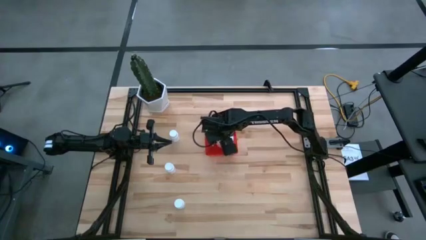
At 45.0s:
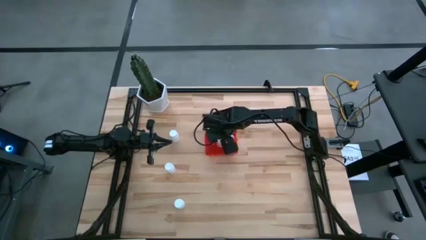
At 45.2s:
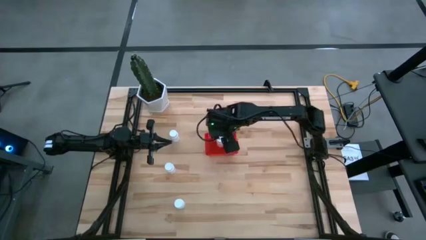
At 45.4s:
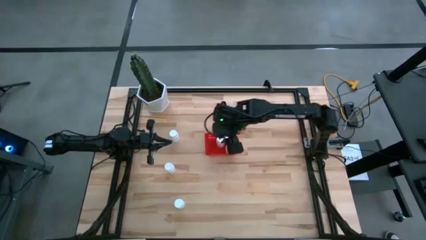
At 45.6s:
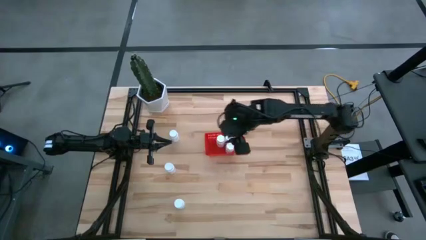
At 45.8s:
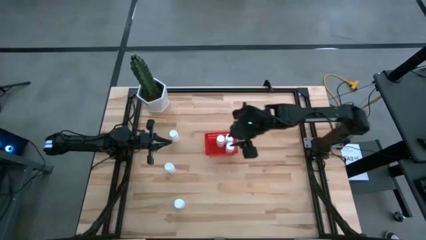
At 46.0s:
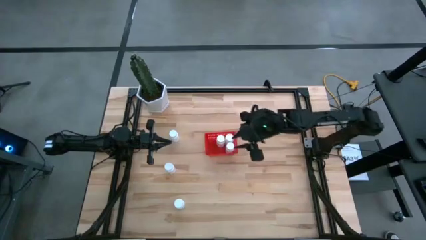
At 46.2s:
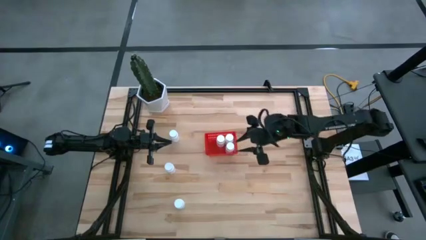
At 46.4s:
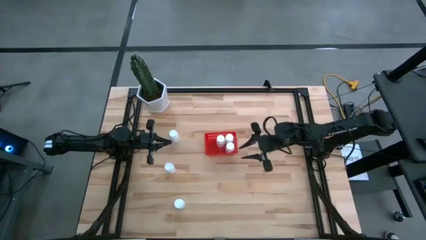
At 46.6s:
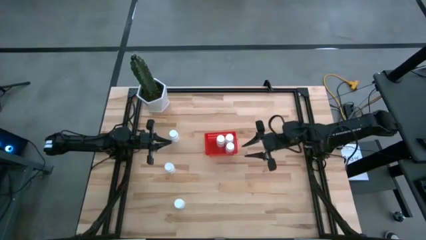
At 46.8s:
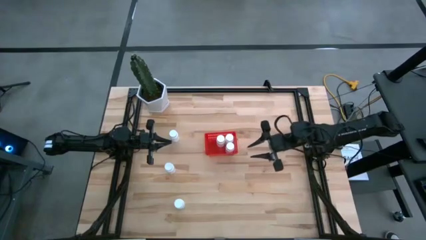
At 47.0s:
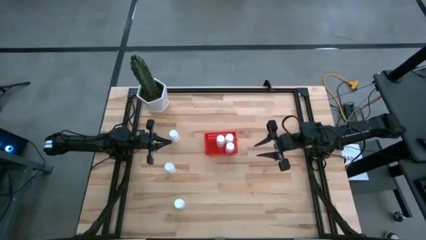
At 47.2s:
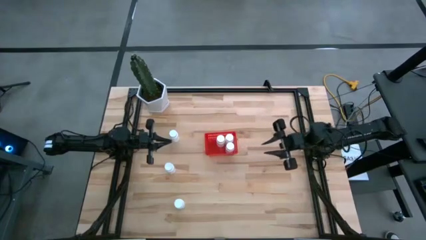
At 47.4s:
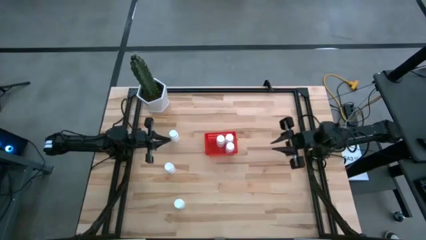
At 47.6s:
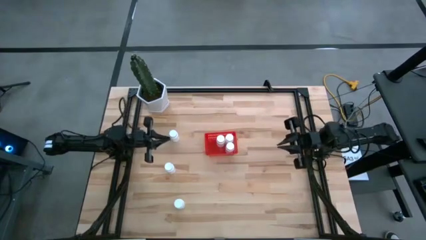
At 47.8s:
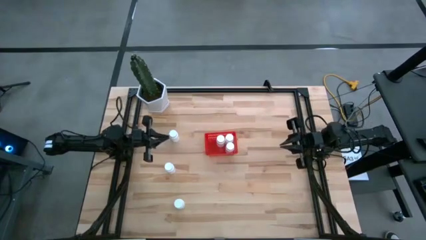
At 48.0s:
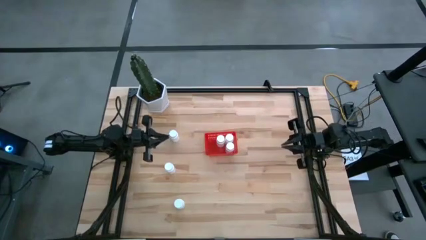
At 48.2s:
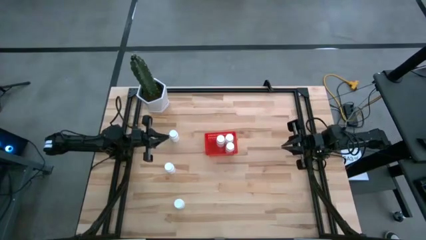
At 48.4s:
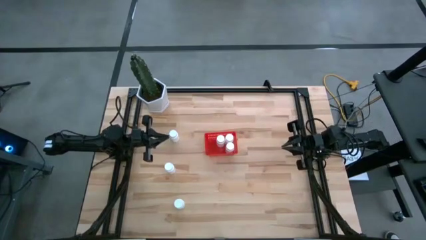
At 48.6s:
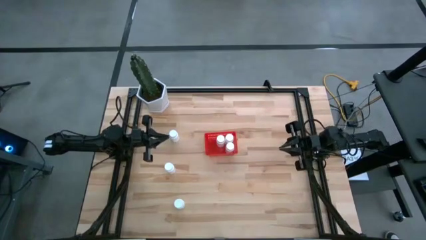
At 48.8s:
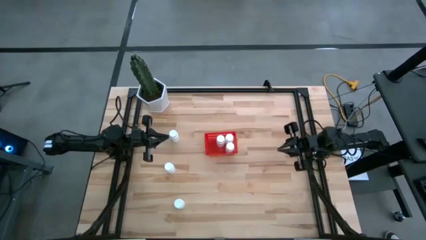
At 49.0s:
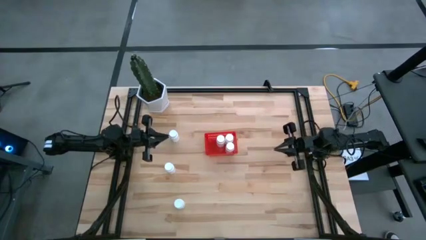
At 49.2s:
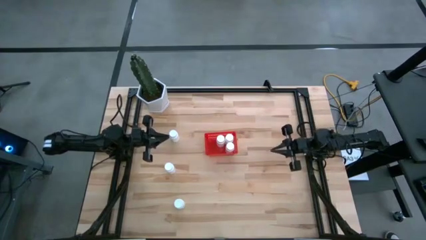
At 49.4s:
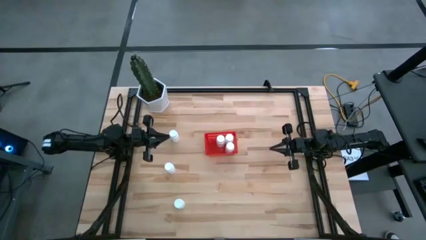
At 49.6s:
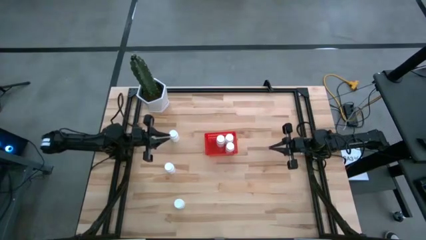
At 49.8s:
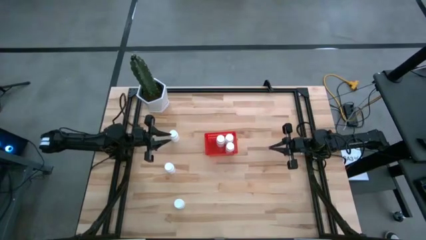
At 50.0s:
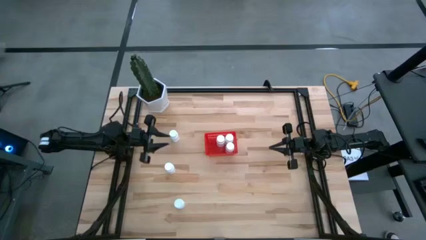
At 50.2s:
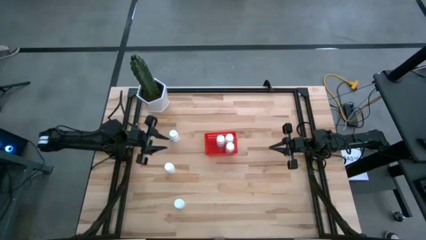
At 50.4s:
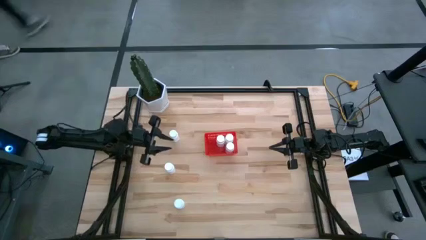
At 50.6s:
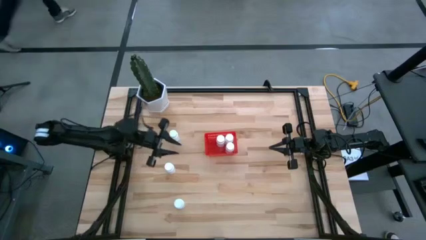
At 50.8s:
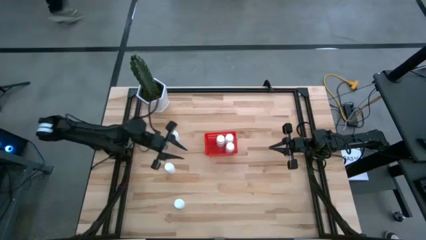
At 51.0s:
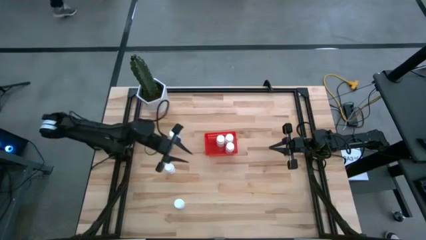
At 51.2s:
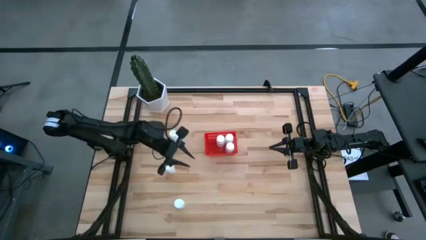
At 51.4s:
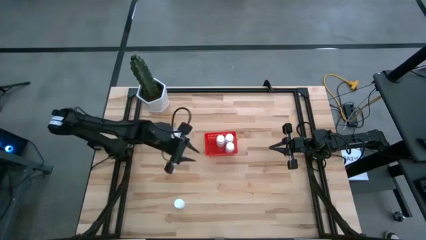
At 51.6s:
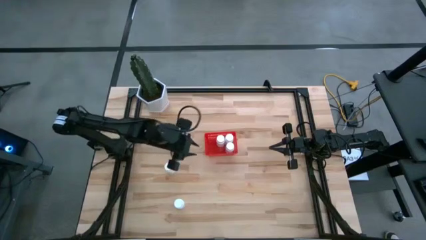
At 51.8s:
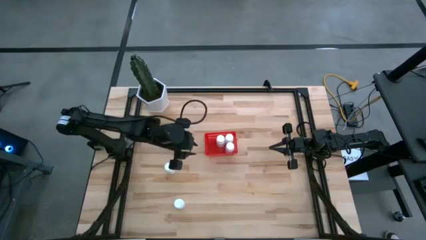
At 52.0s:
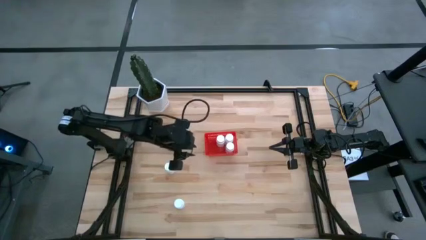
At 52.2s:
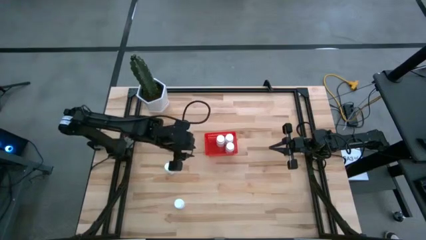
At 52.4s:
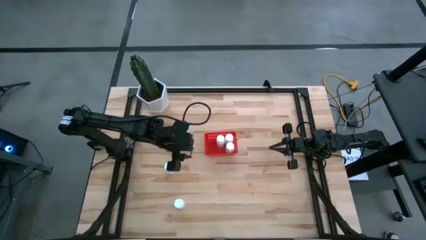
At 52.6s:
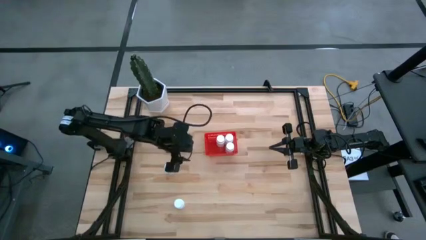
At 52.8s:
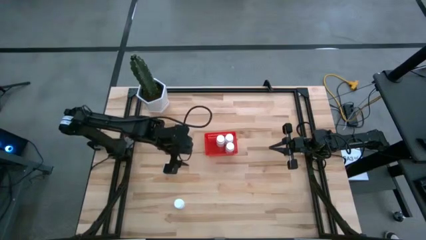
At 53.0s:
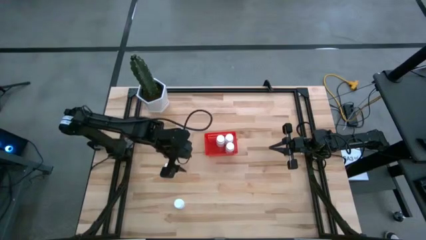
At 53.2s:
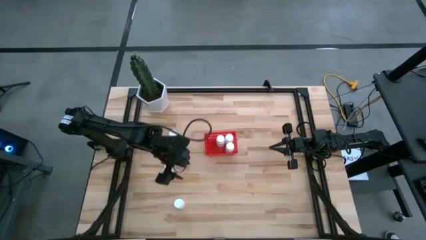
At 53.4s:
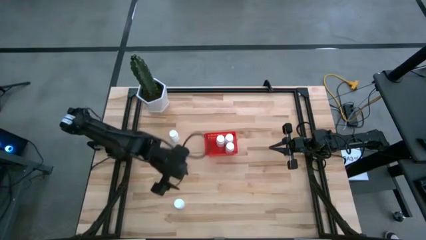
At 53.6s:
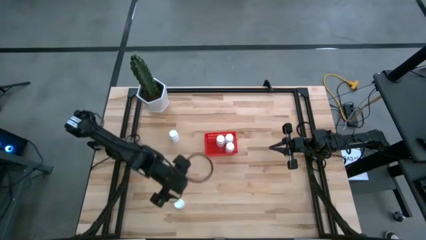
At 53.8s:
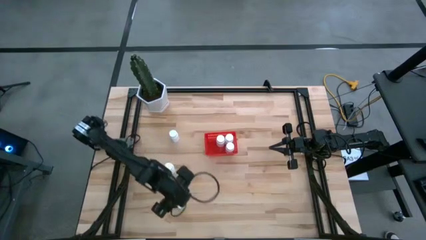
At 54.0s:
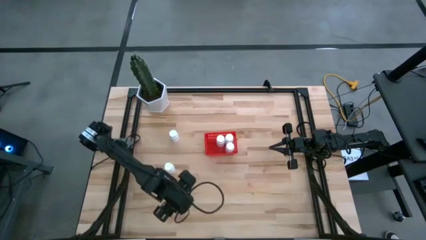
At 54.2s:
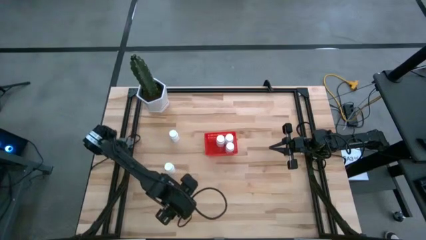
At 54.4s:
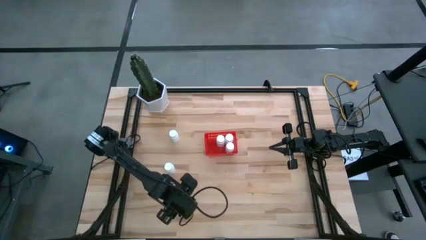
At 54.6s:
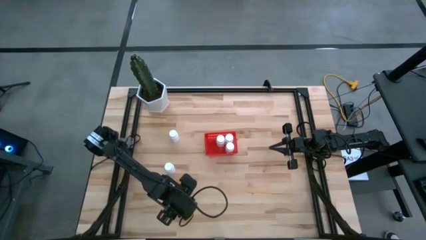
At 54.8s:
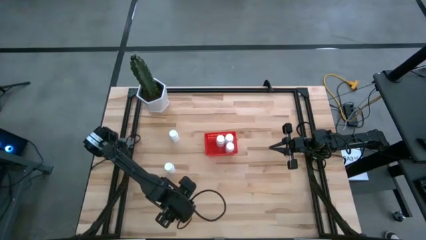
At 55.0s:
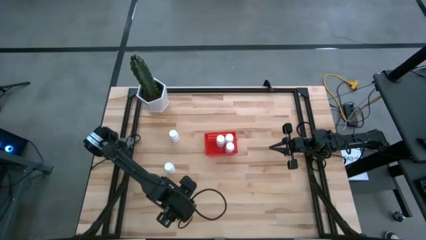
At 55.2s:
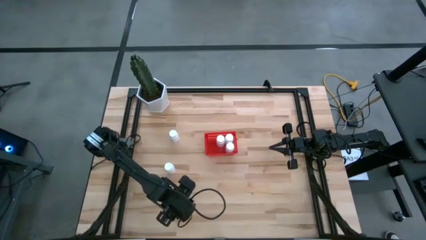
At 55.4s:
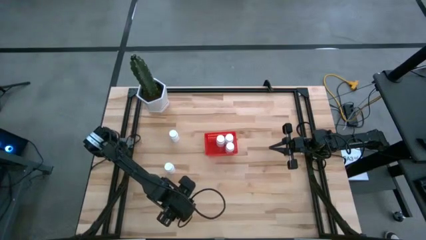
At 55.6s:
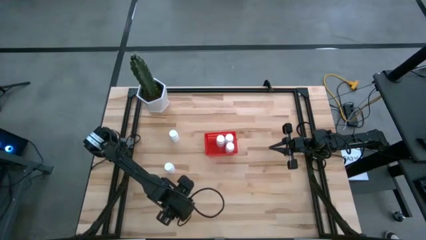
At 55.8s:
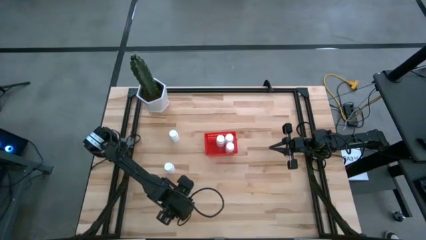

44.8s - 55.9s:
Task: Pick and place pill bottles into a basket
Put the white pill bottle into the red bin

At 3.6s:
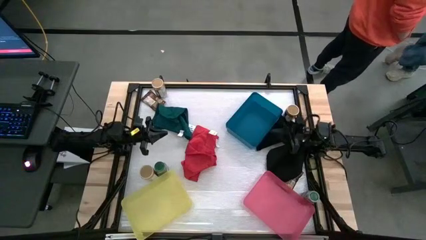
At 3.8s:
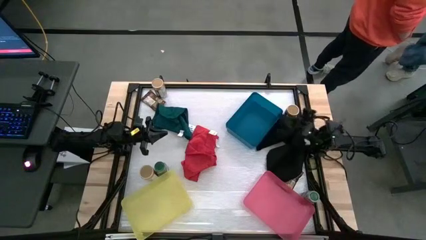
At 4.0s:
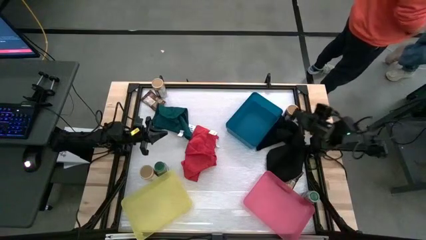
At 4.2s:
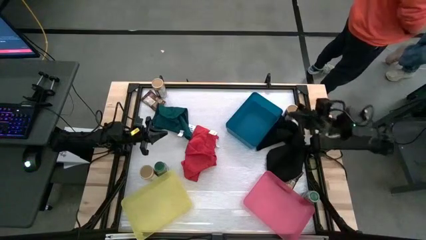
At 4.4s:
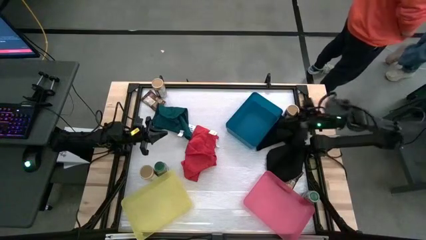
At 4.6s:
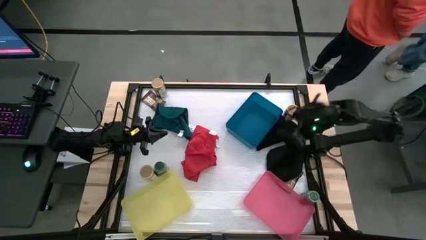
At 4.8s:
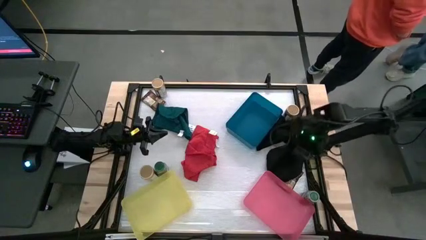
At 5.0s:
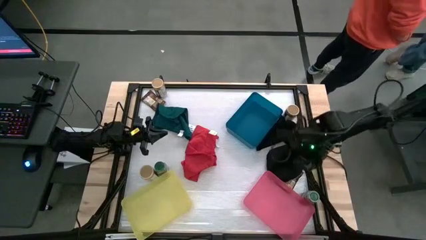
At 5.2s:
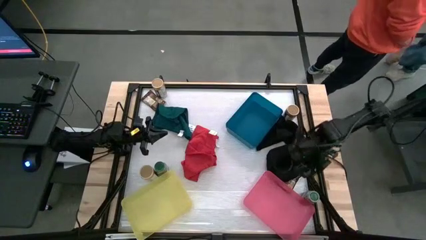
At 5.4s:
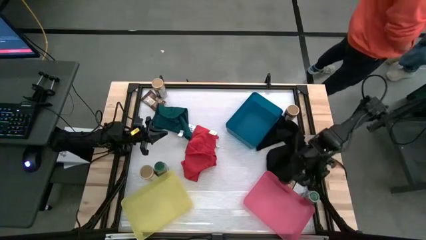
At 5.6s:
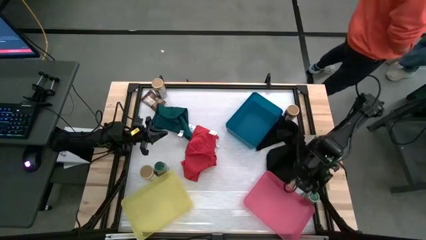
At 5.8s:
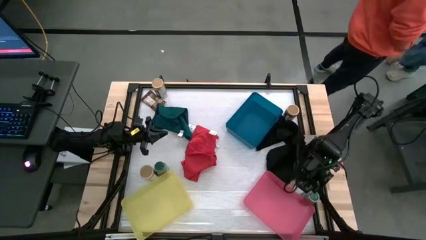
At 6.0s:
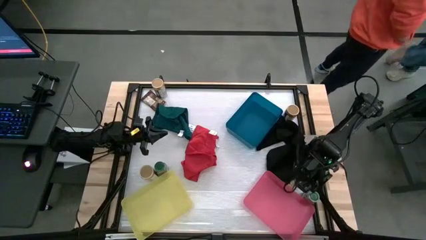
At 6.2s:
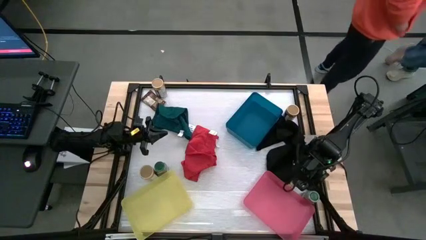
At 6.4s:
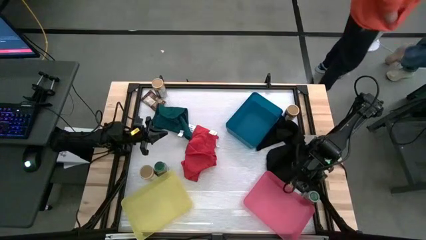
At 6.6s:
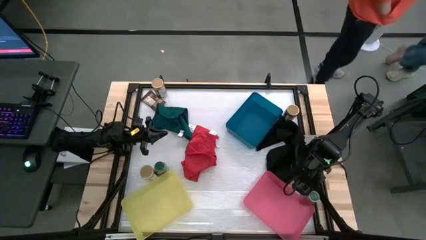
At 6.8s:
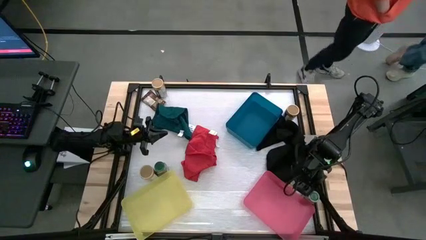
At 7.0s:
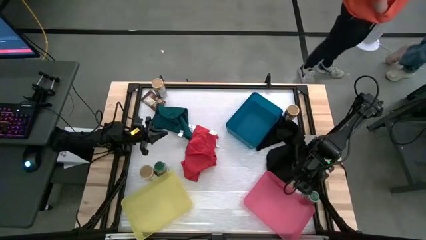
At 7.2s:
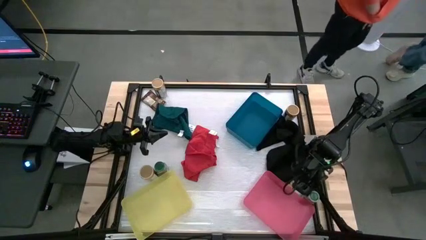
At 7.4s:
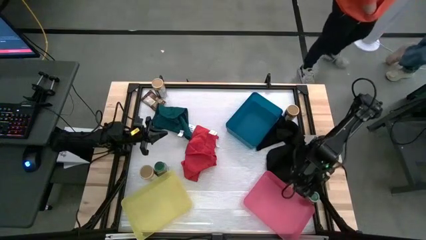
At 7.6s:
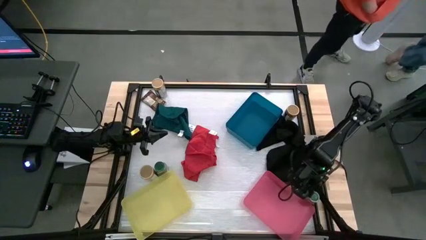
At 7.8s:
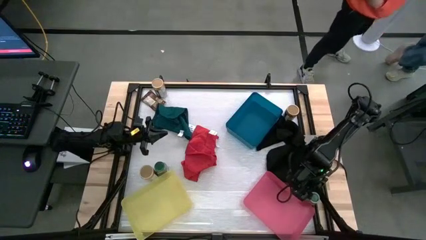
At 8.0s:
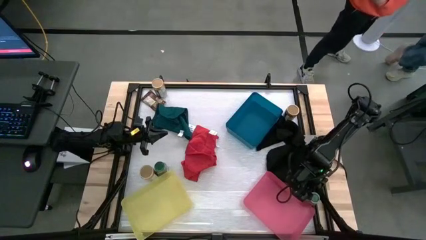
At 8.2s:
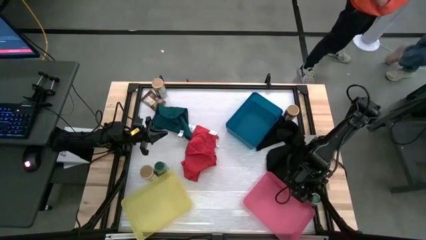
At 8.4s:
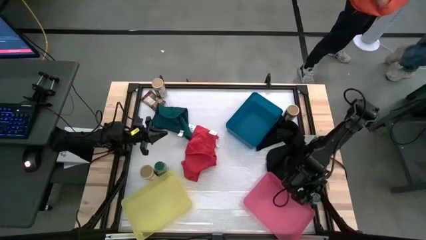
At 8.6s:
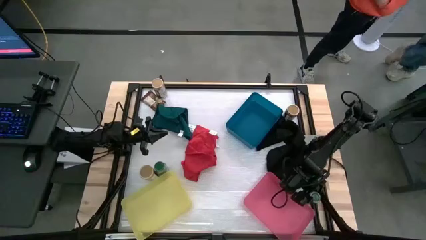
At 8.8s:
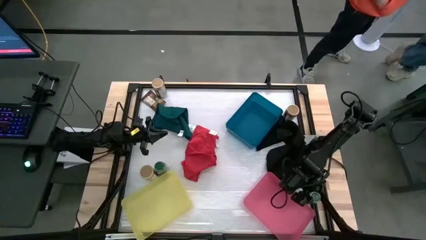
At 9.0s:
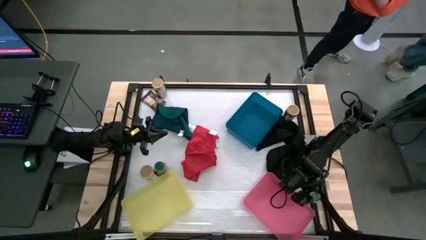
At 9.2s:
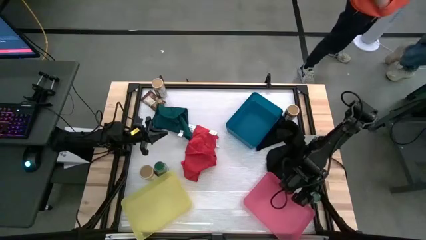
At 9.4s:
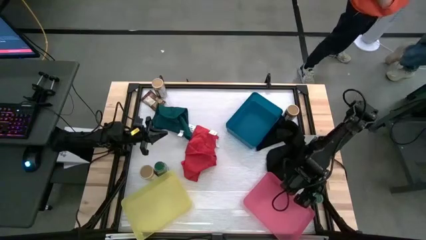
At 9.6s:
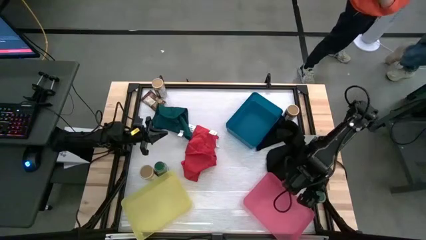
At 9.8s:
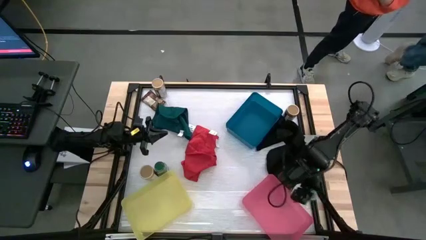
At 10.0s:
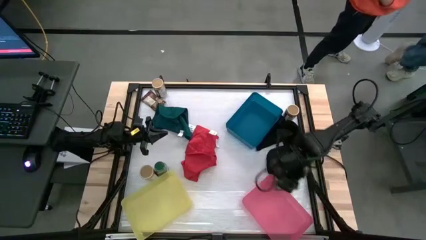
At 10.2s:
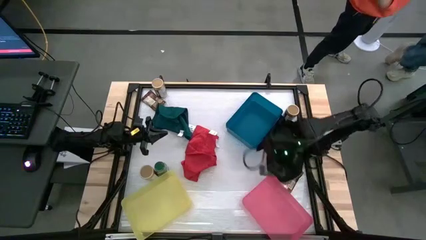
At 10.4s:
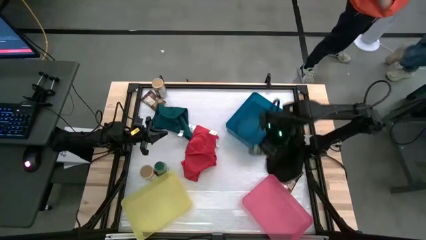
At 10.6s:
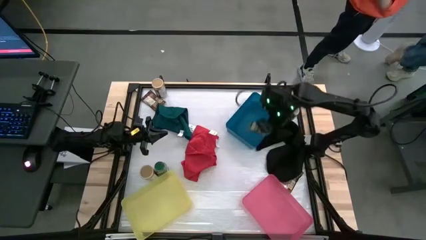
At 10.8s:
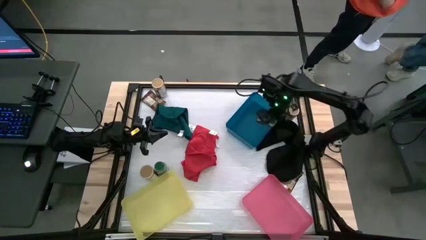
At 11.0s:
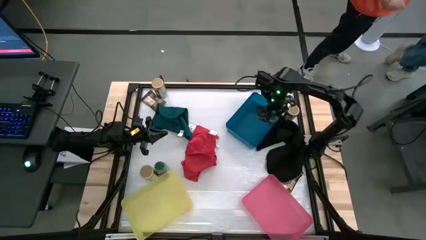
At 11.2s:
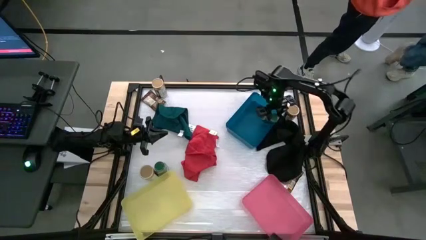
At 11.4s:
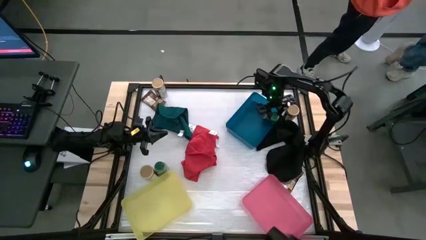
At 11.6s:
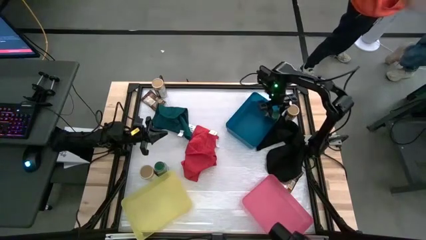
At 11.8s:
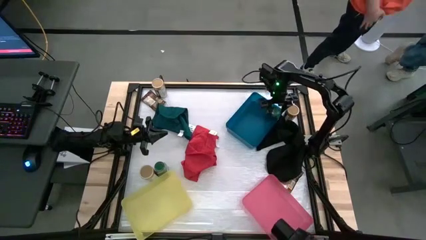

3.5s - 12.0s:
Task: Sort spices by type
Put the right green seasoning bottle into the blue bin
